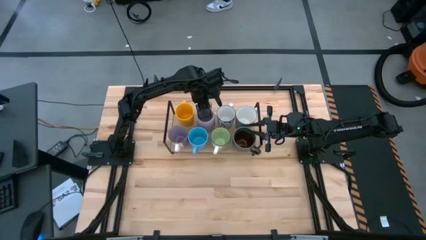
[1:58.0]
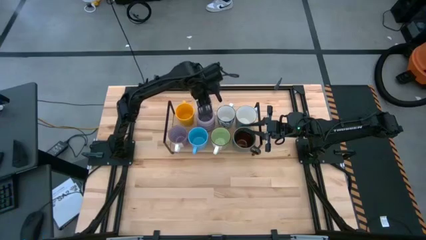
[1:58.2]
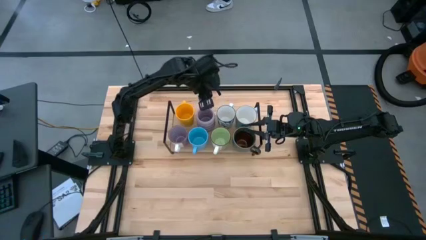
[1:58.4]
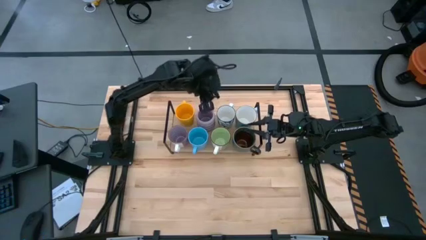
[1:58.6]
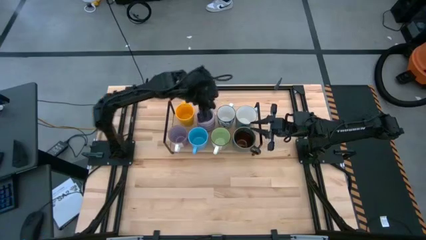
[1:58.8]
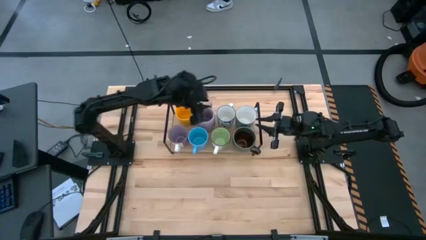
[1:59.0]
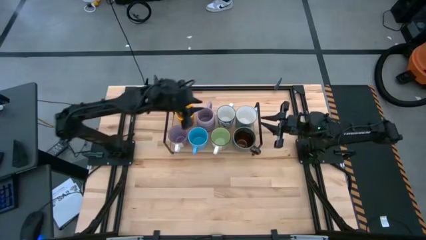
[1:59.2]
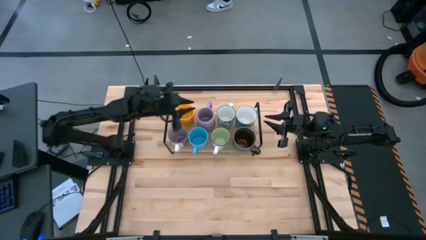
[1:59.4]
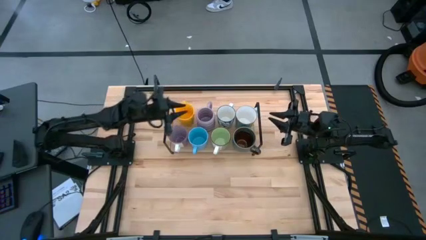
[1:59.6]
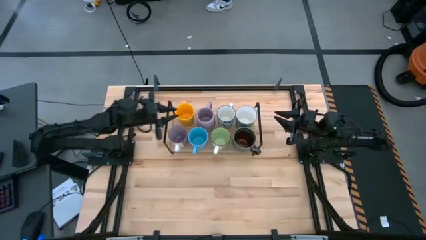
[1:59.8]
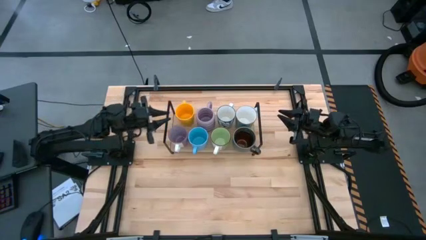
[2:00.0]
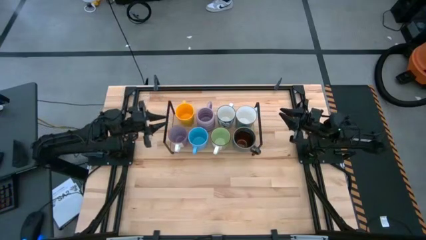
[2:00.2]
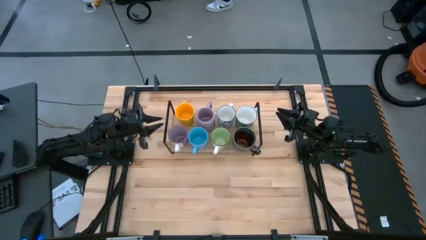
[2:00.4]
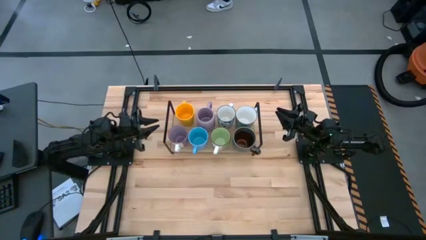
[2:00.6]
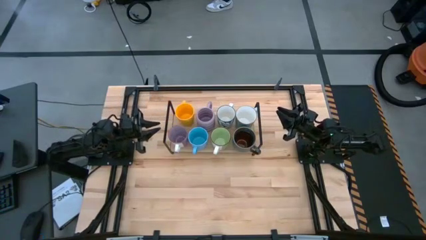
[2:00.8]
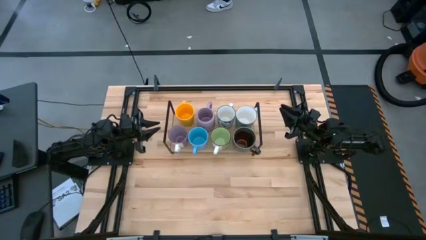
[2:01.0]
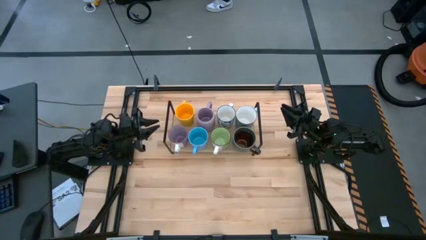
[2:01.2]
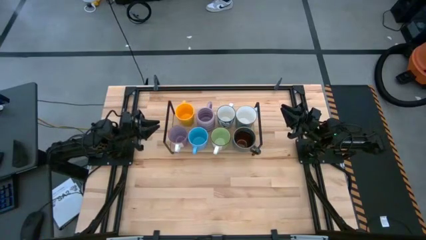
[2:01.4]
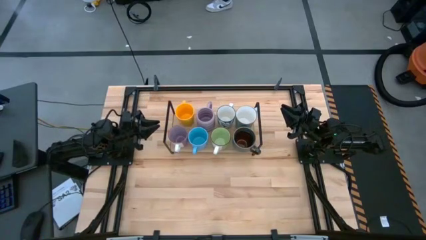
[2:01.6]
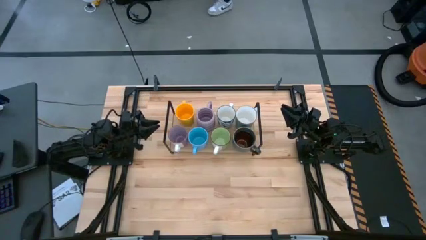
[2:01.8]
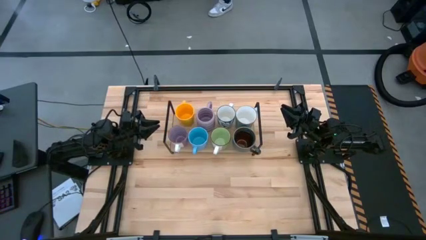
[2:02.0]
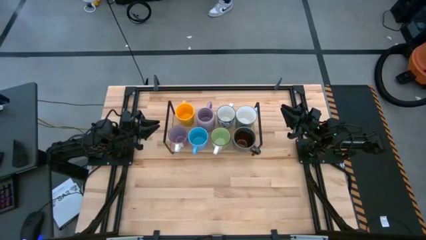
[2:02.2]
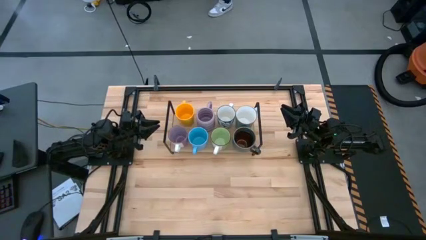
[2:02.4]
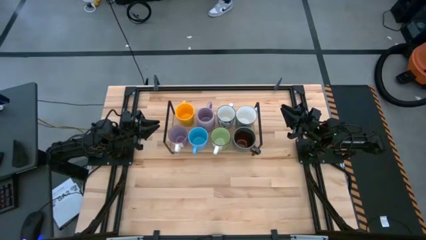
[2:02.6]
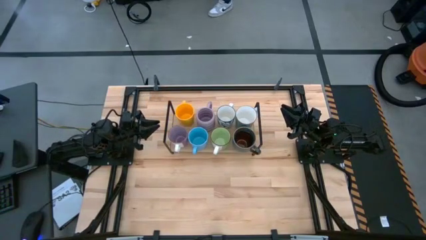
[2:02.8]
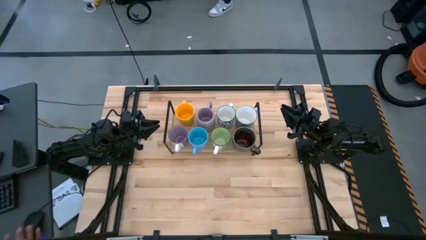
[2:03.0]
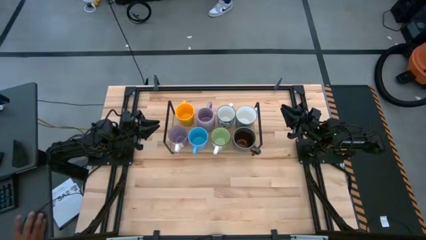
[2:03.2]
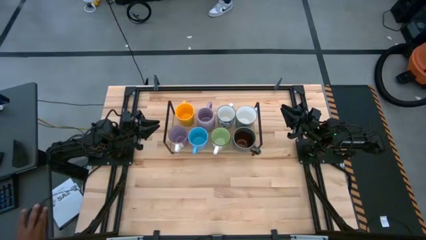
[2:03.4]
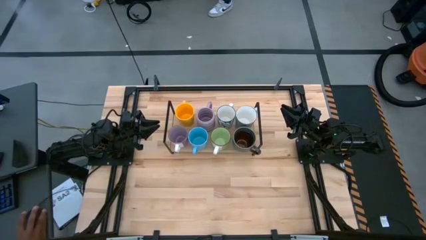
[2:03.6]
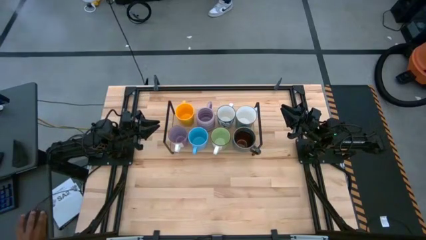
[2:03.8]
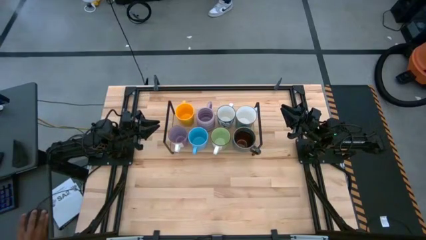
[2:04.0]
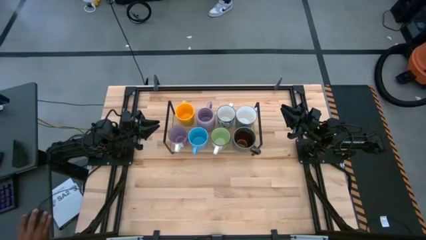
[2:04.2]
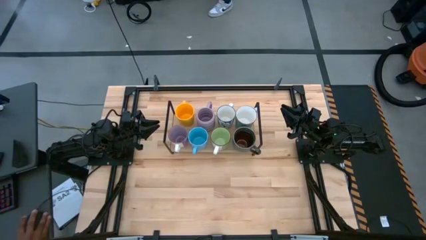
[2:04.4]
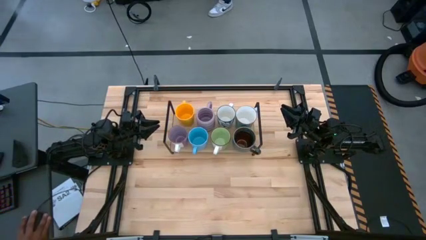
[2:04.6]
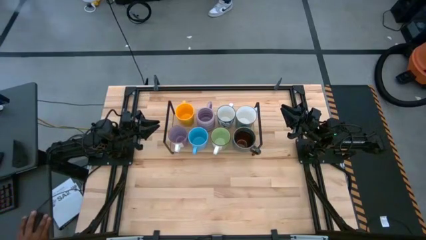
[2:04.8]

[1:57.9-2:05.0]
Task: Place coffee mugs
Return to Home Position

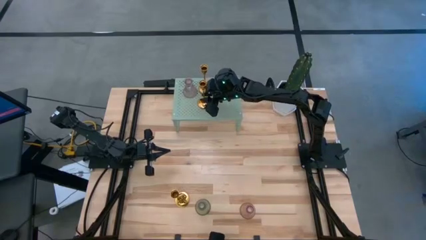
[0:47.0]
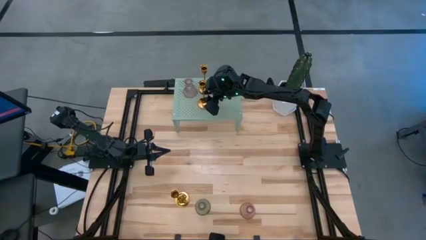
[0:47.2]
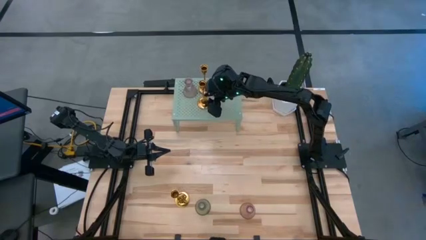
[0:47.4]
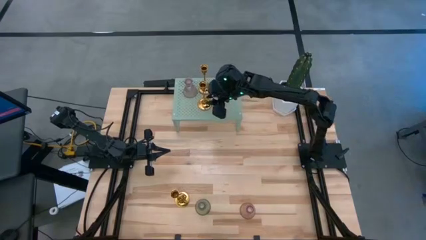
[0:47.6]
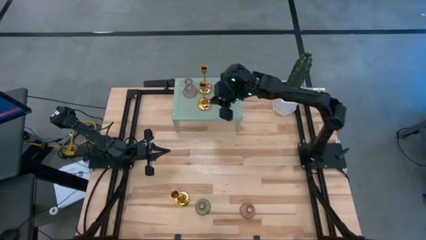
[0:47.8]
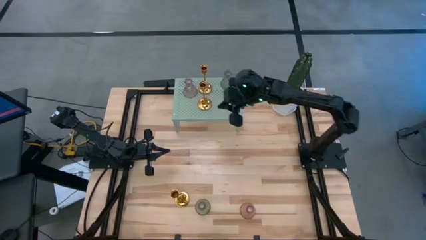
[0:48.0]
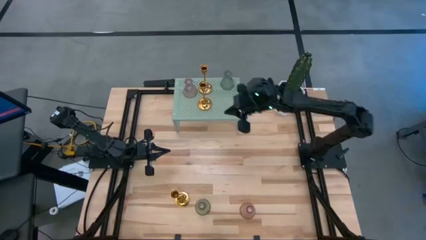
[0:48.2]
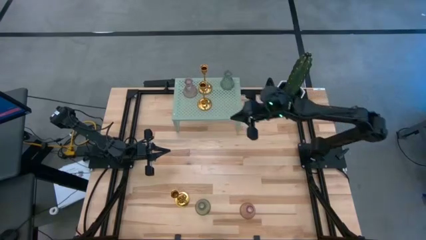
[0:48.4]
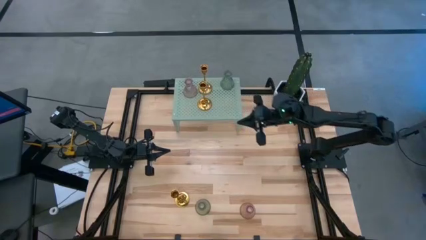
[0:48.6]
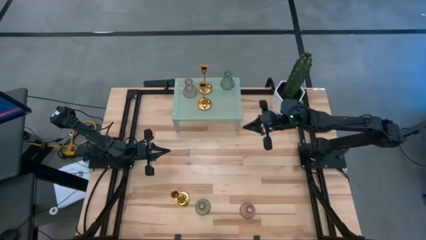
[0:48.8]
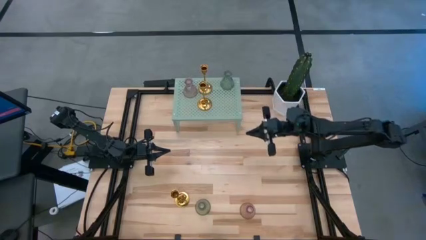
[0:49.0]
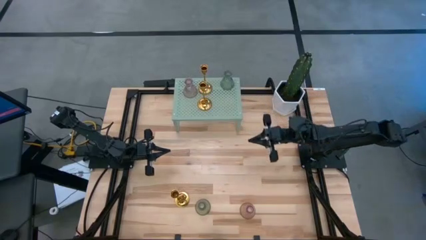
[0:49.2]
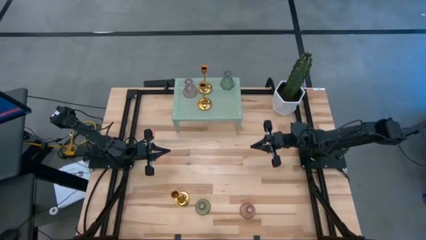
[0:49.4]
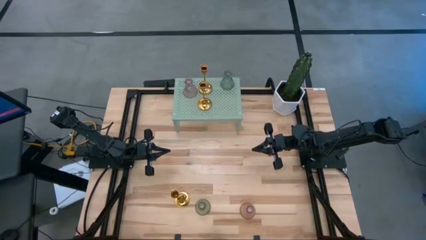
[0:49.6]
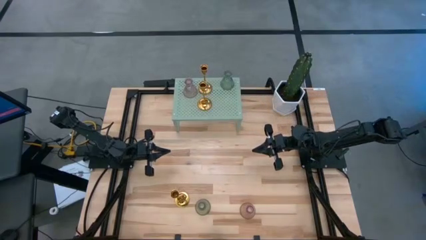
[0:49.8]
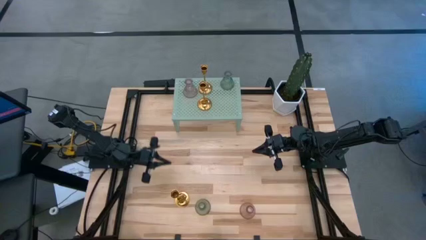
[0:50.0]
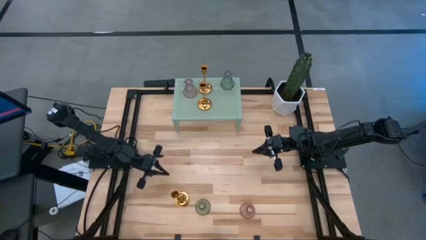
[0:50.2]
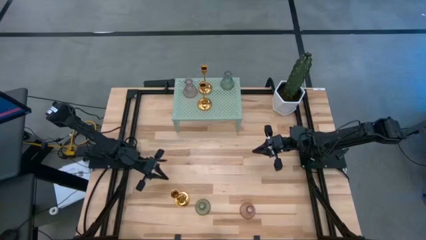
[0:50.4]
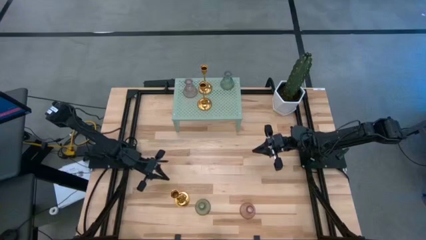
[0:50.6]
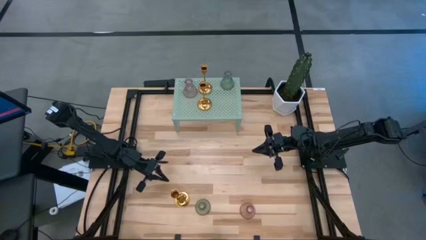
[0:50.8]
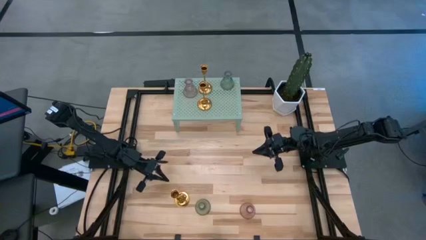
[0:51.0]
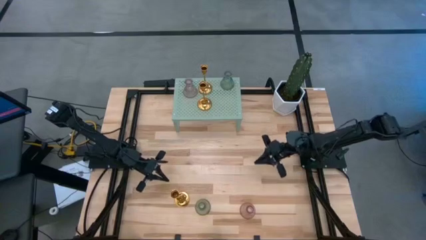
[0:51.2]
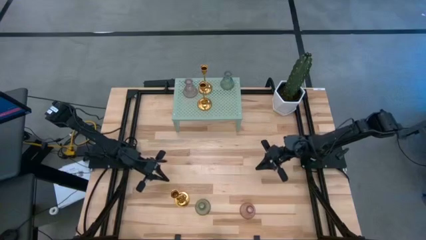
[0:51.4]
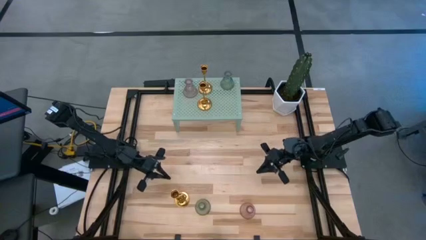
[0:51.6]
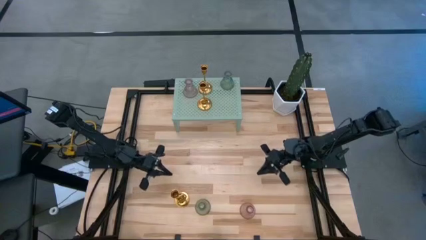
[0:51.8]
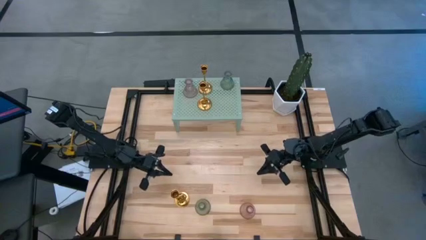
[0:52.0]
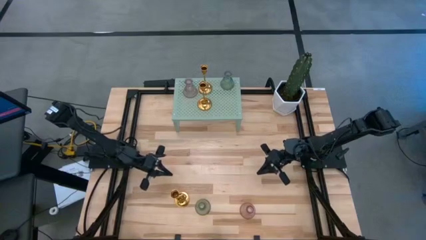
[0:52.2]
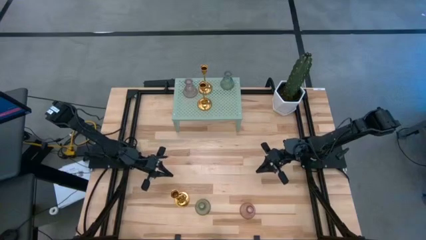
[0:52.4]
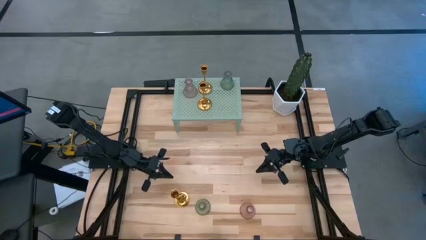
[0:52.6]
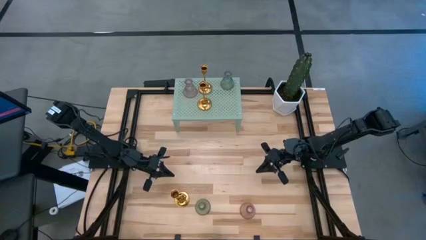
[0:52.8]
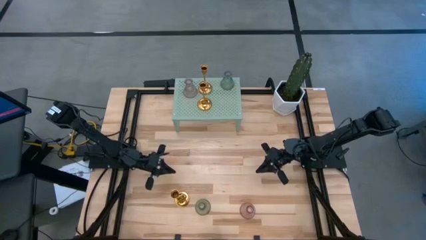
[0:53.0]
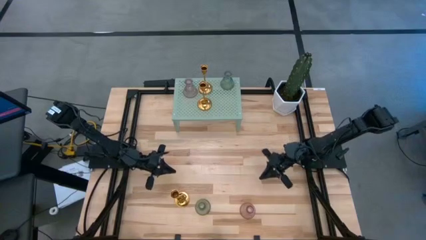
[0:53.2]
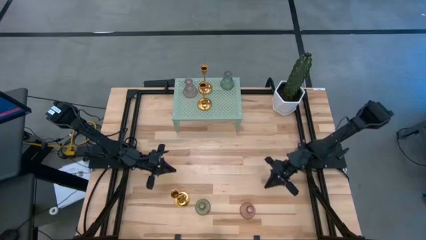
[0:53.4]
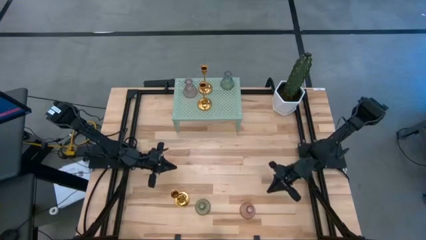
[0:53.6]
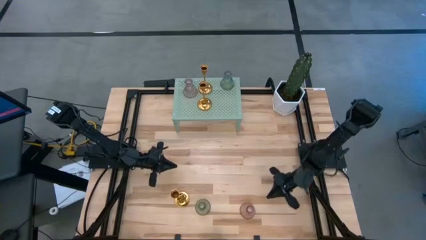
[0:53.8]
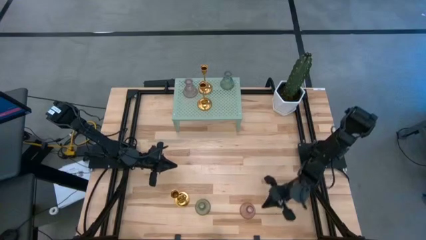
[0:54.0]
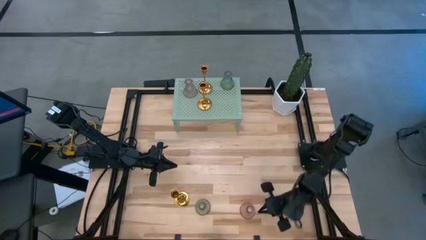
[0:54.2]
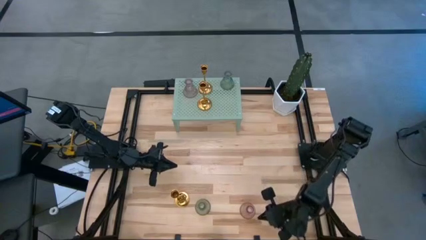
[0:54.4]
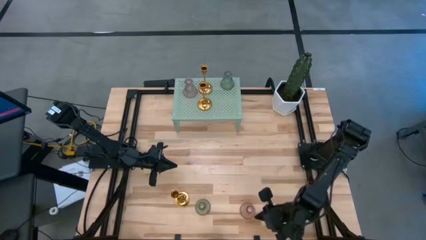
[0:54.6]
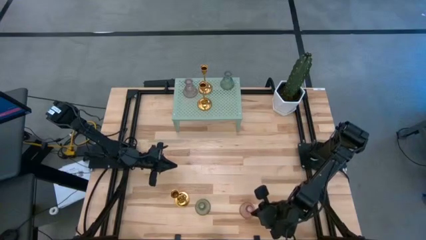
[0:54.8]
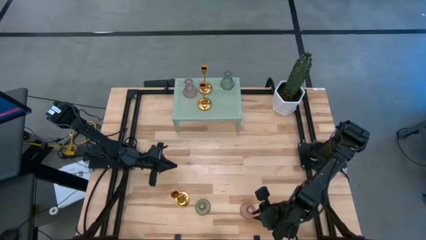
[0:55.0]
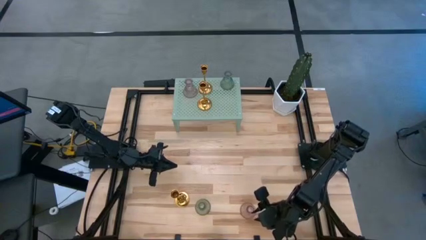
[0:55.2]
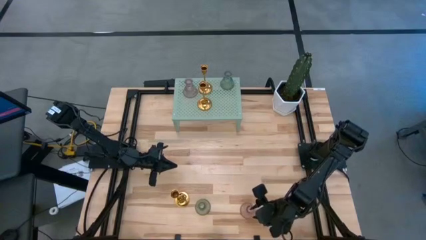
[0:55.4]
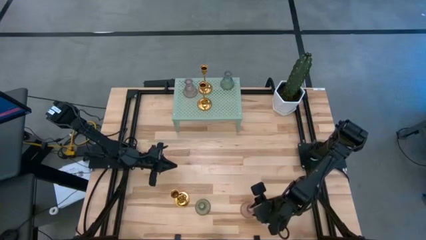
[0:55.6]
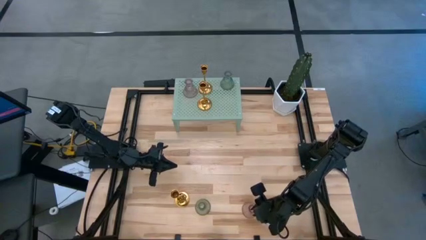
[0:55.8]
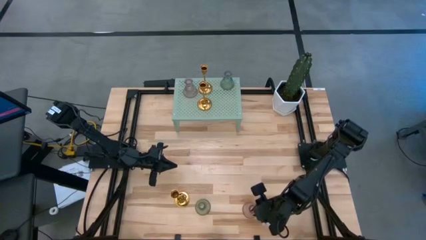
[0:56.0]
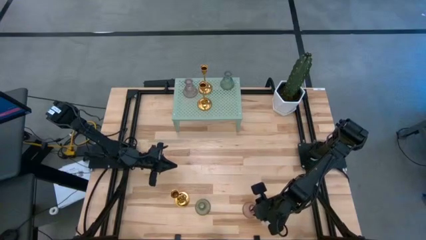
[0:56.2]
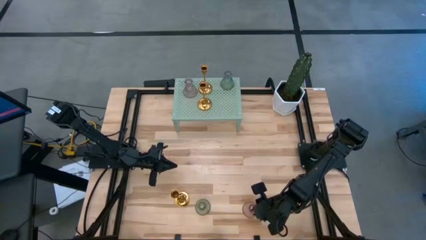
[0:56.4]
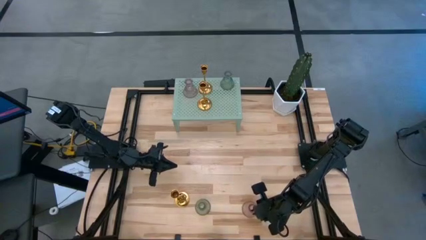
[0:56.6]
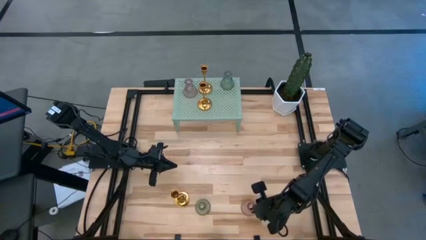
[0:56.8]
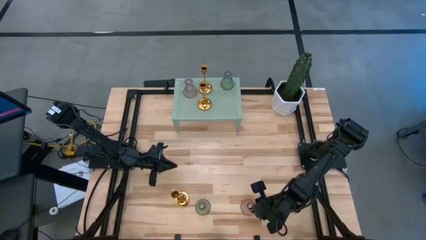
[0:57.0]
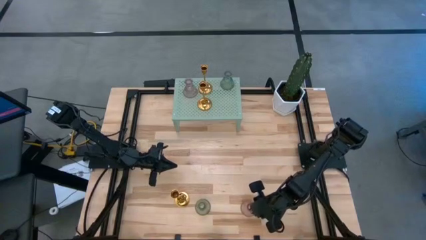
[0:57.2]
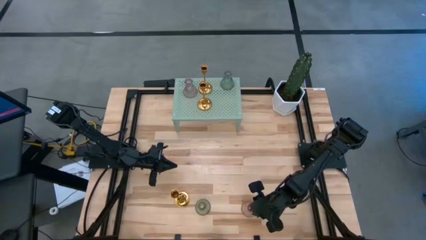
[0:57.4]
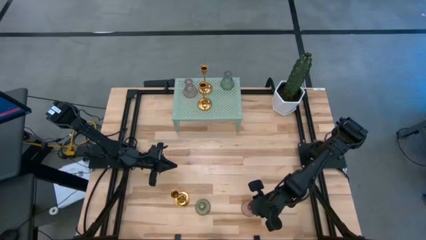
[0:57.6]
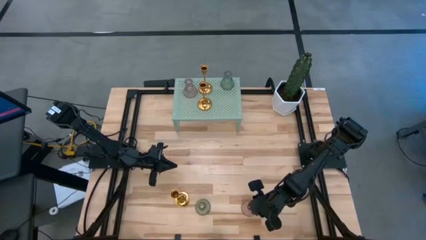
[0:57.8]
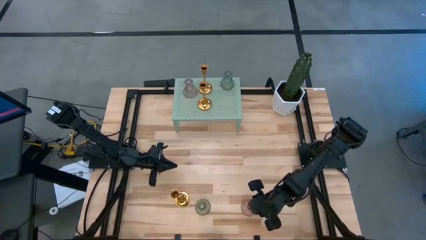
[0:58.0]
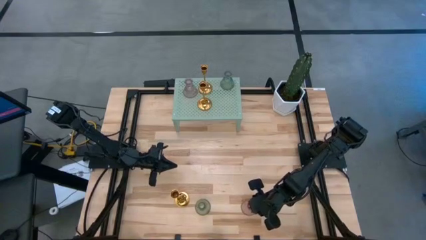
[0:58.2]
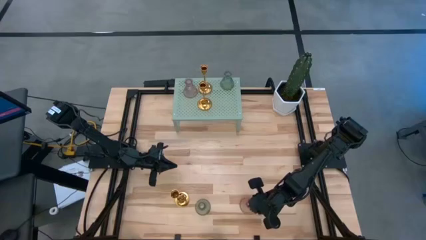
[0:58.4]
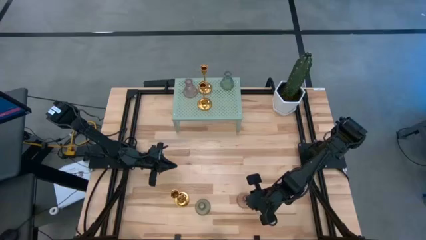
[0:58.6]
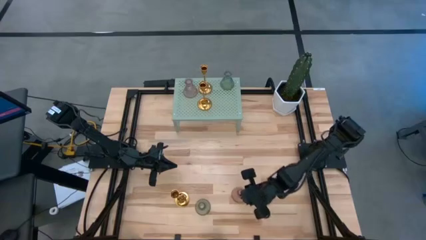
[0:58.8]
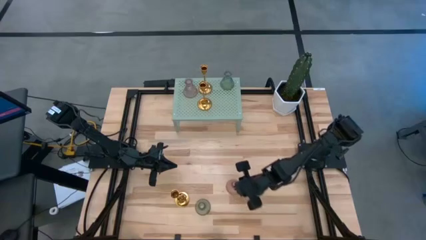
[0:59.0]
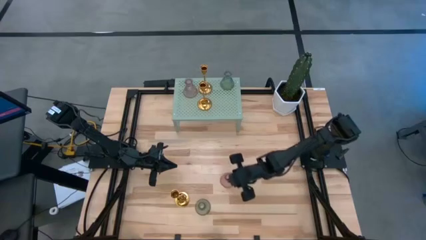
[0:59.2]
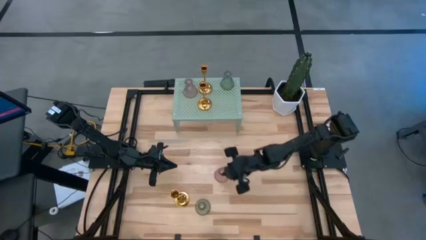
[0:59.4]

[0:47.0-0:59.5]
Task: Pick & Place candle stick holders
Put the pink glass candle holder on the shelf
